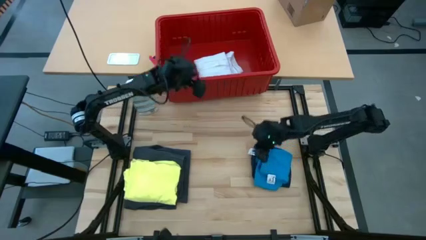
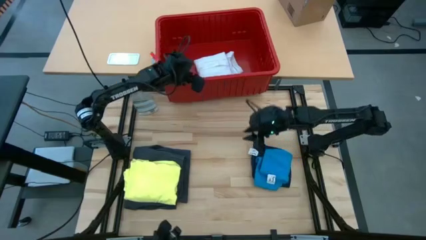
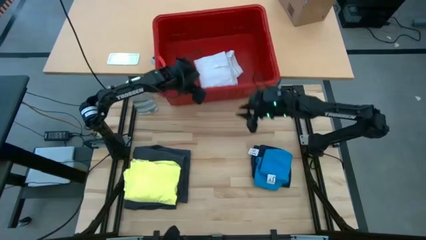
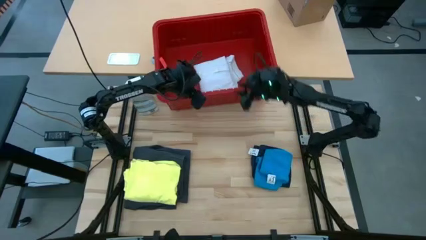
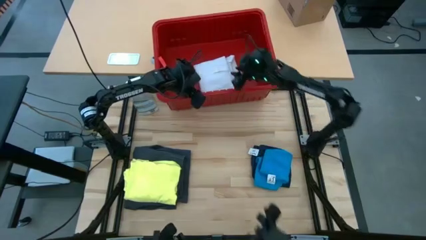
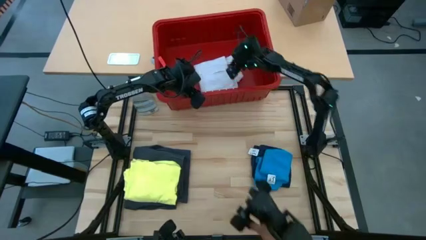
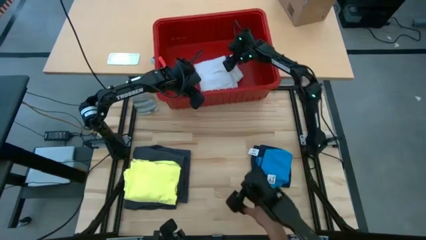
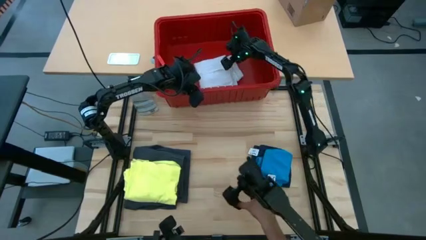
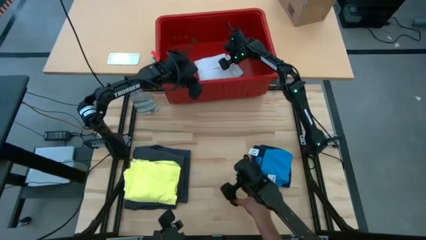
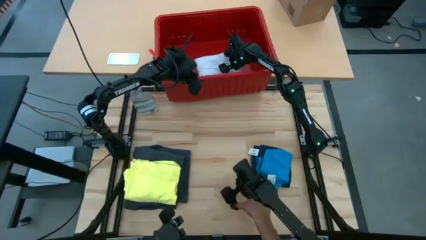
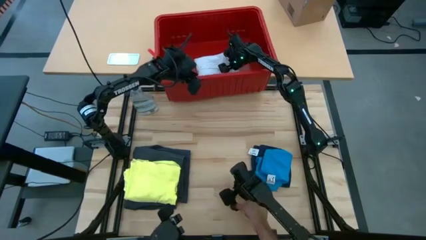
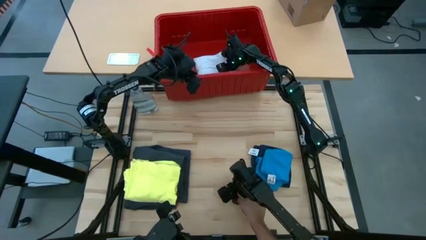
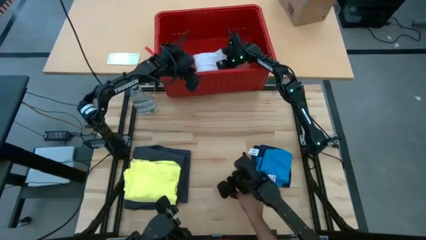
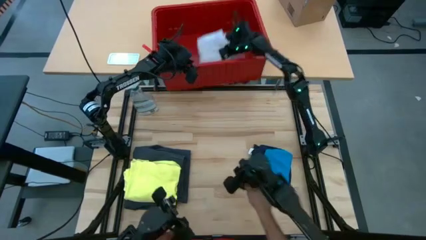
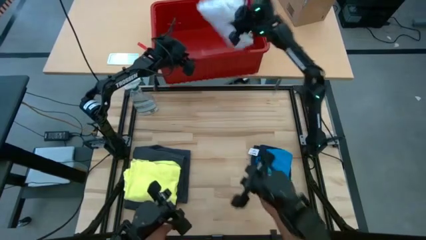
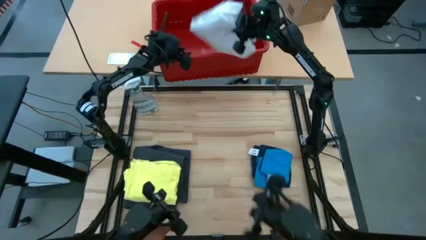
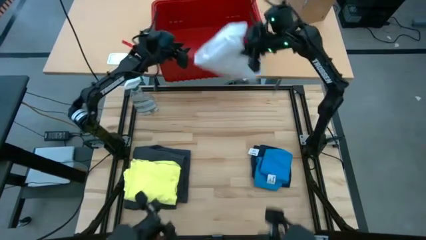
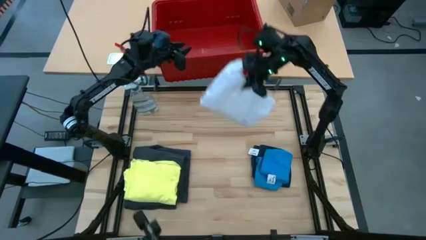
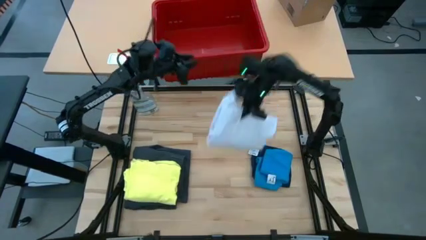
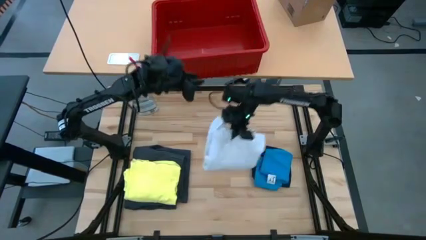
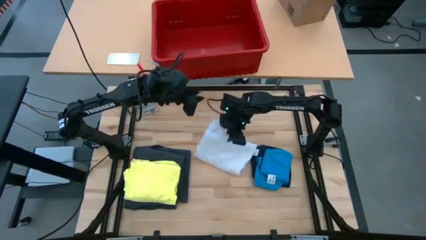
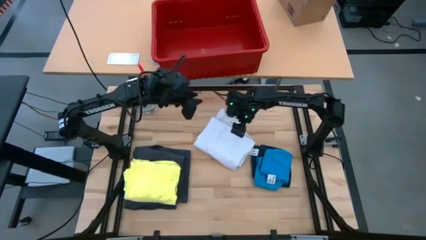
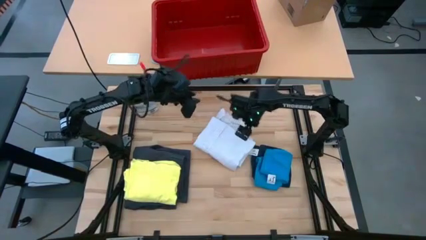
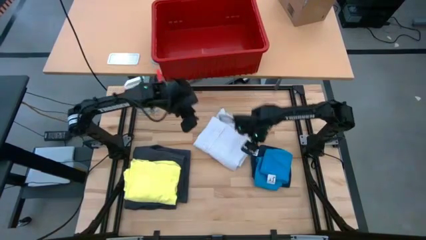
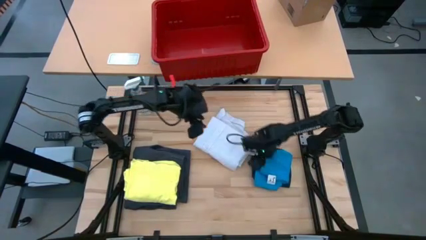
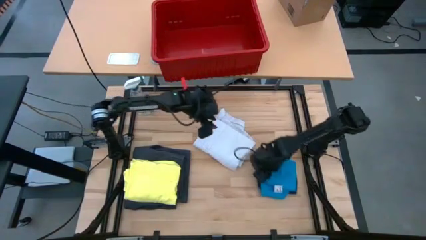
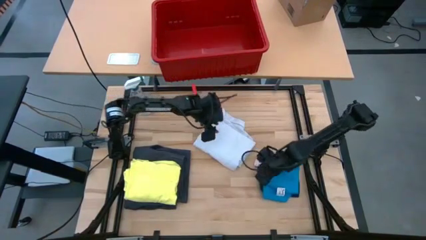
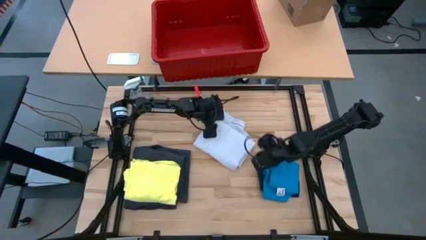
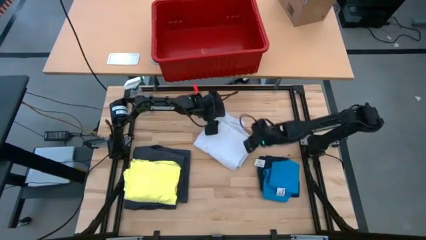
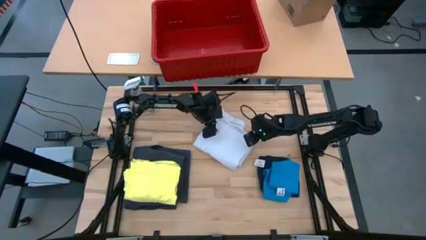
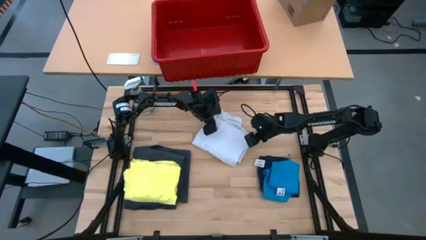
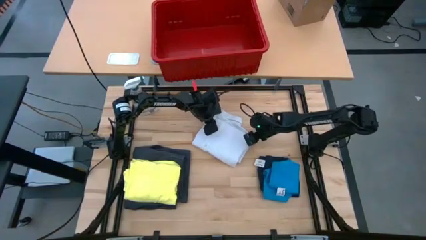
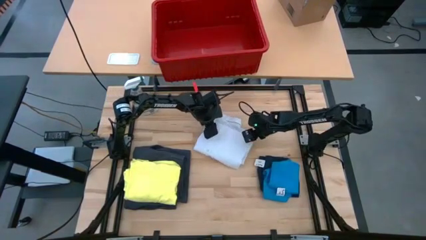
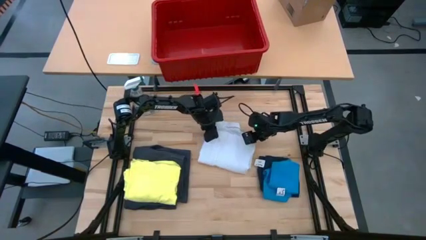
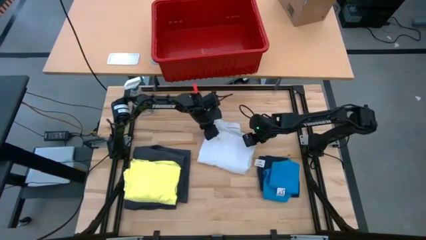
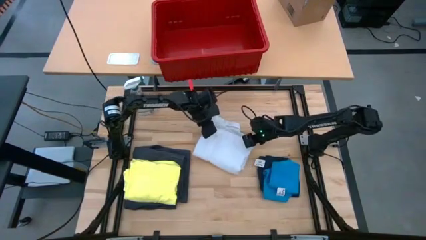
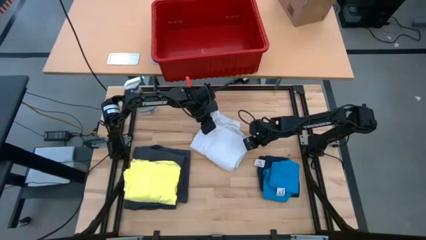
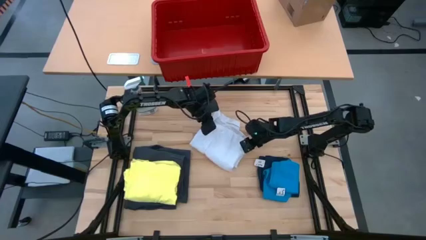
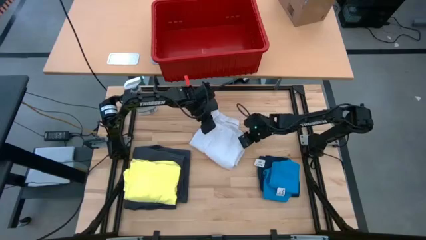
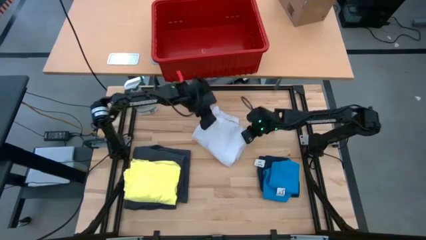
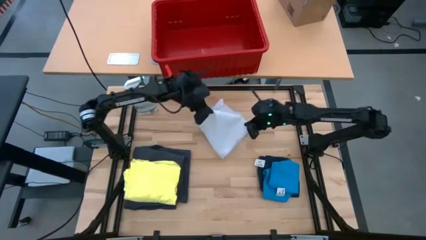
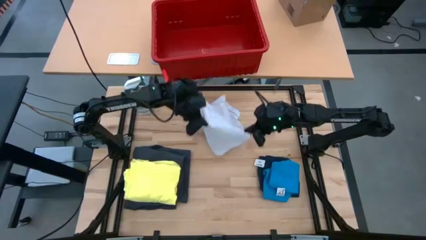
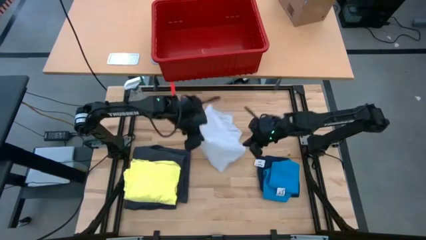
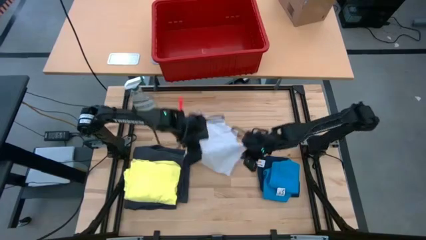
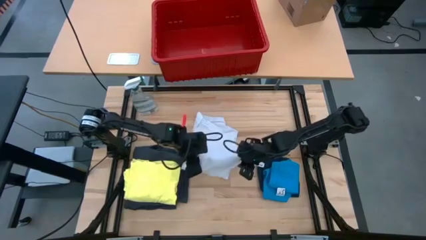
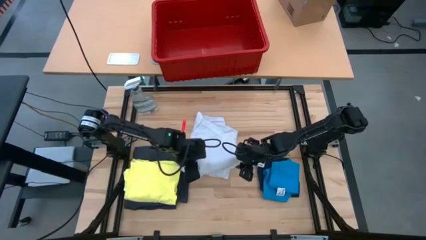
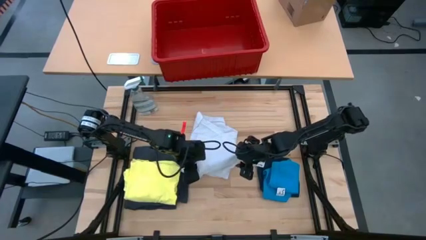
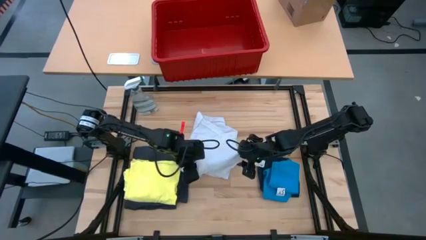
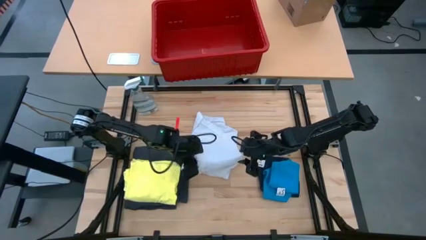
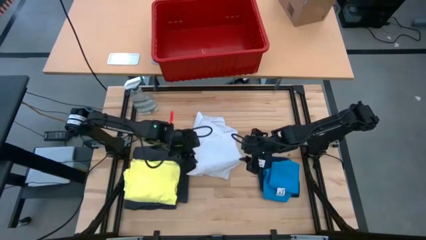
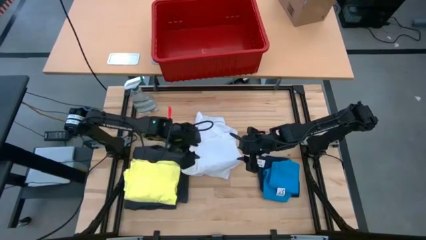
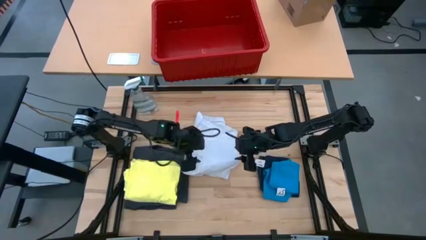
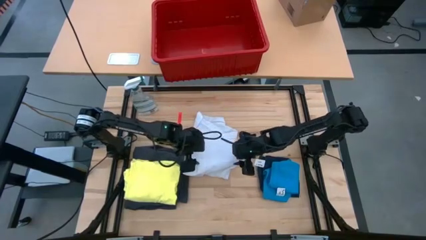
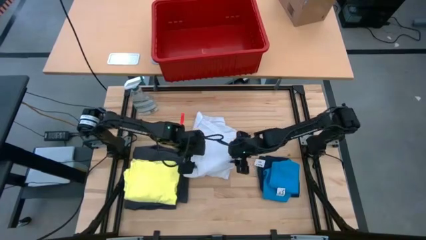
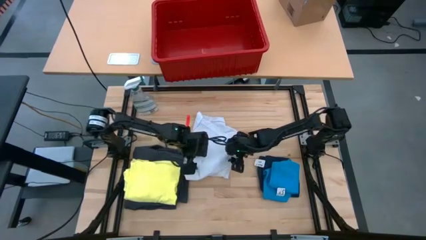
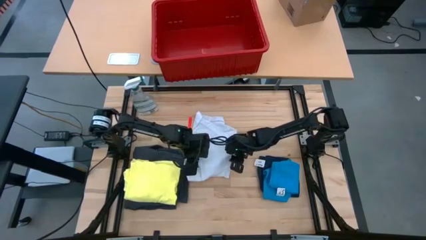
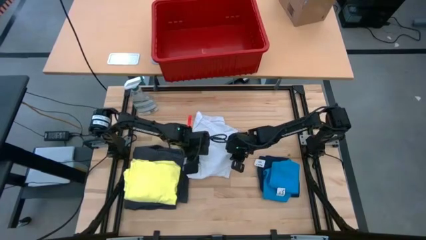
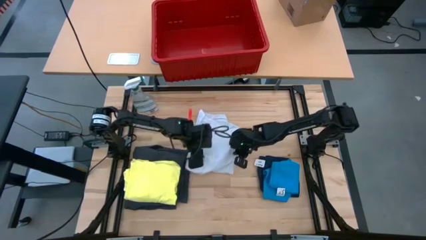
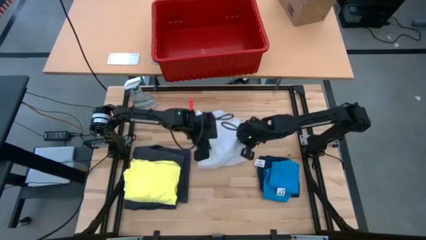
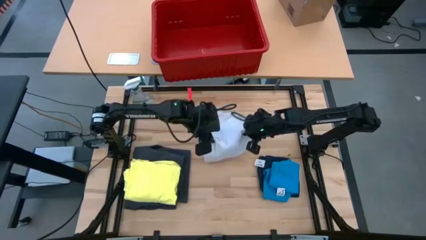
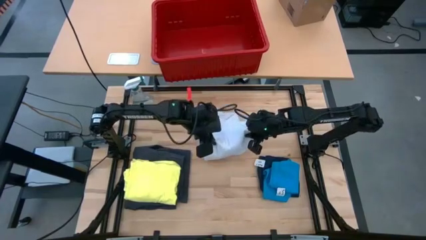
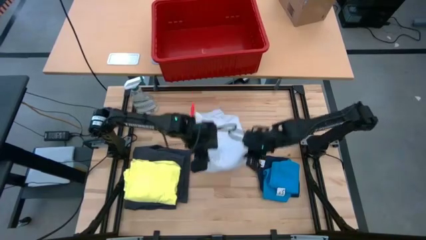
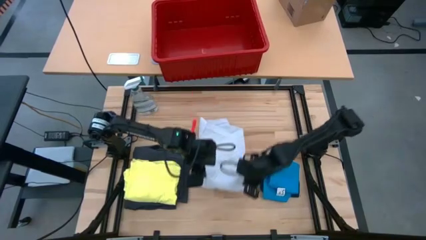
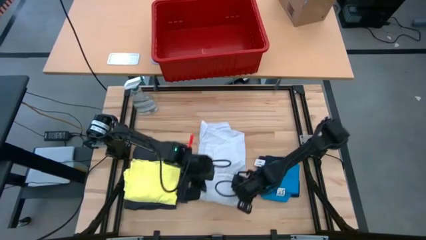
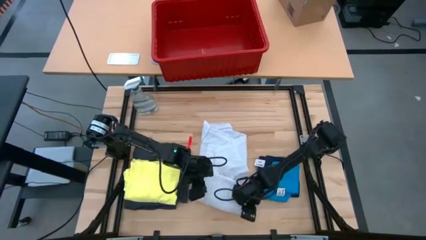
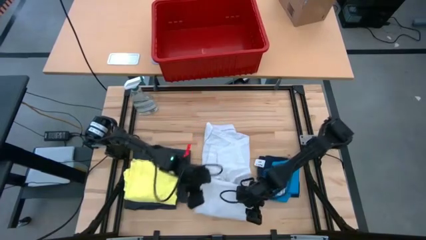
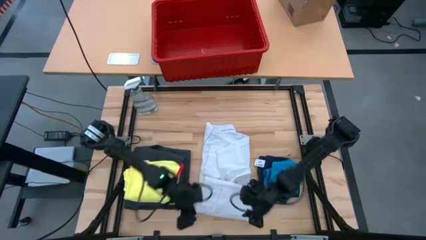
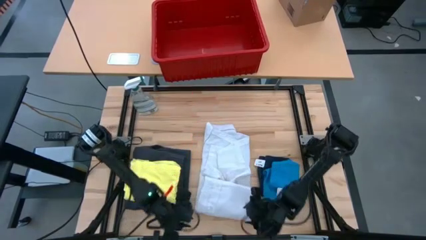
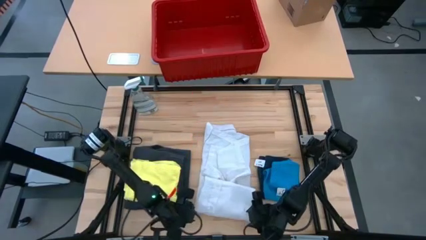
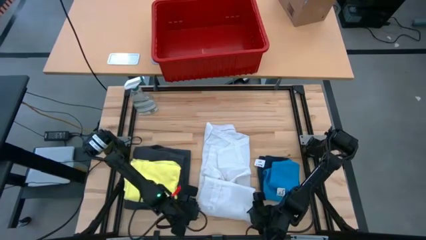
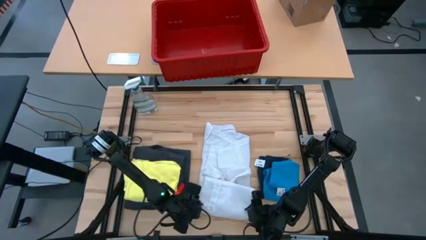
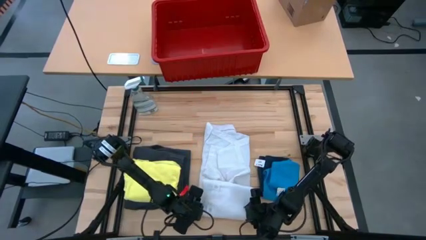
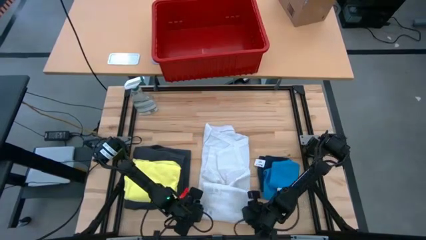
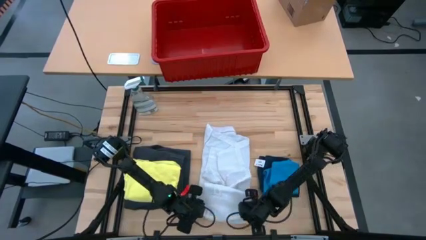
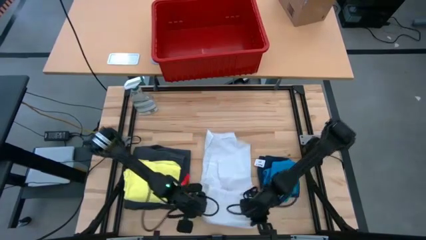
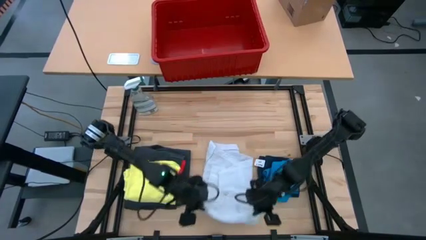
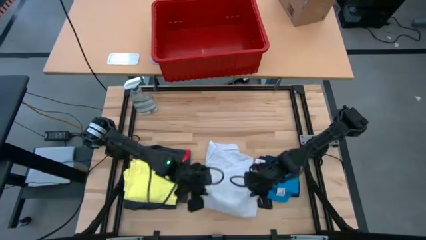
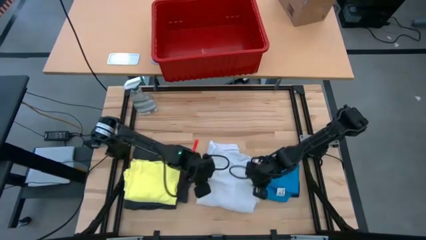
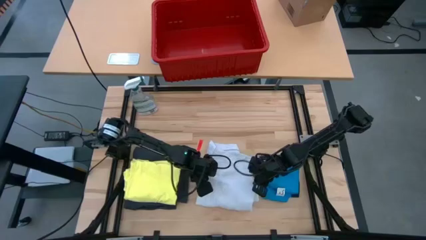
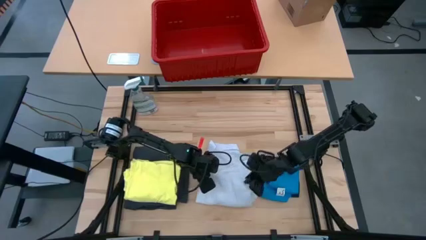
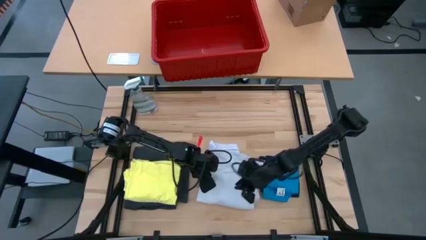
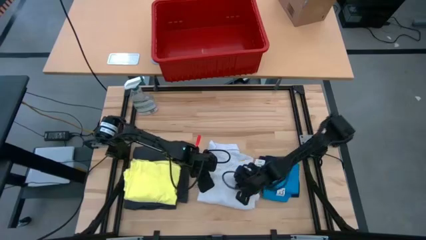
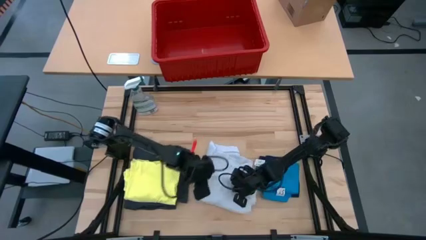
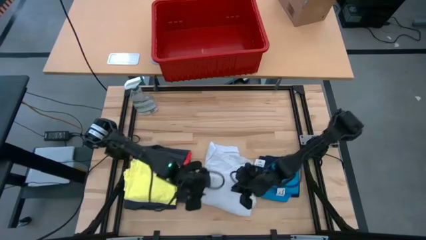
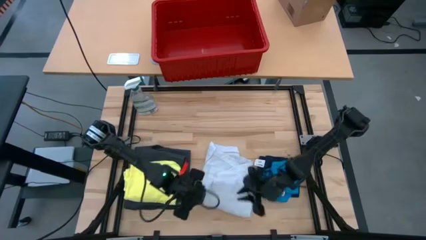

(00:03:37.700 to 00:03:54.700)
Task: Fold Laundry from Bin
Fold the white shirt
